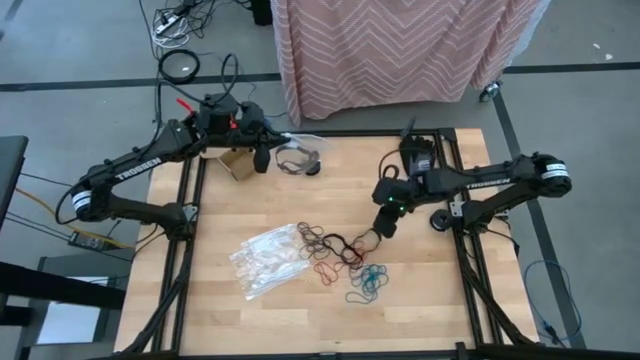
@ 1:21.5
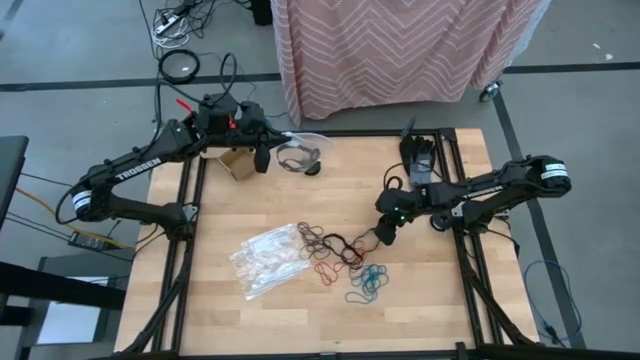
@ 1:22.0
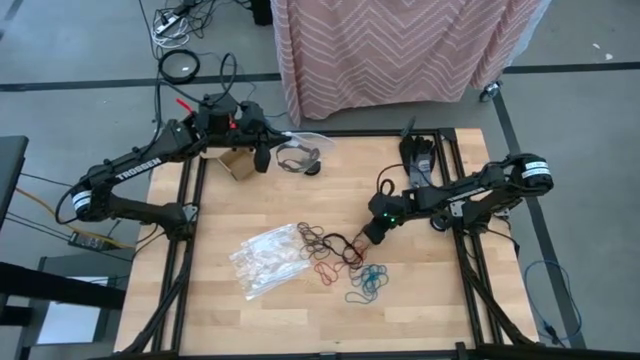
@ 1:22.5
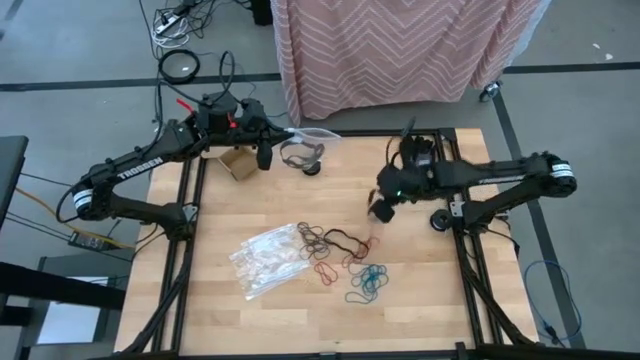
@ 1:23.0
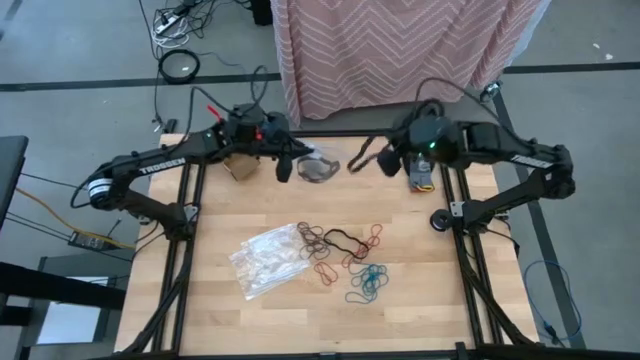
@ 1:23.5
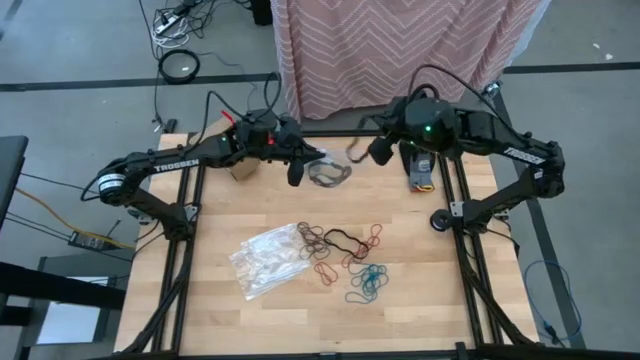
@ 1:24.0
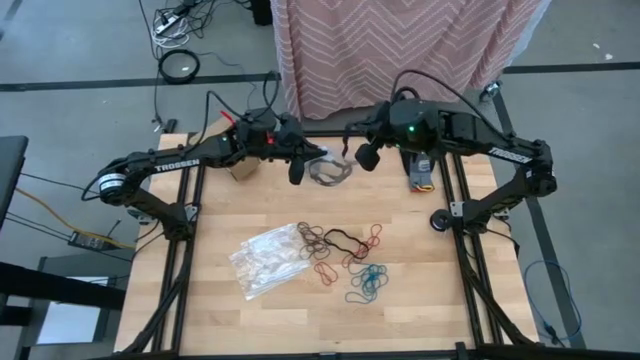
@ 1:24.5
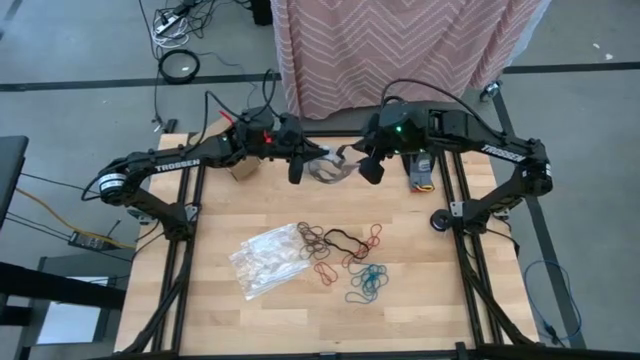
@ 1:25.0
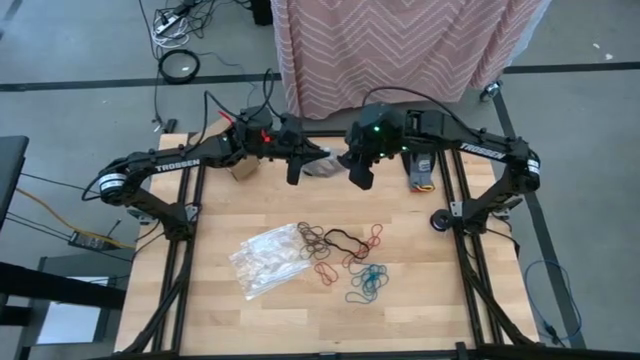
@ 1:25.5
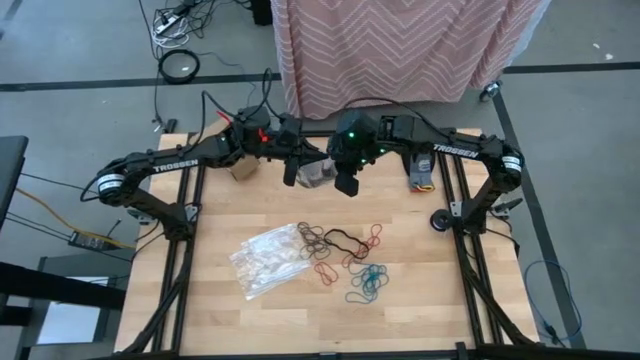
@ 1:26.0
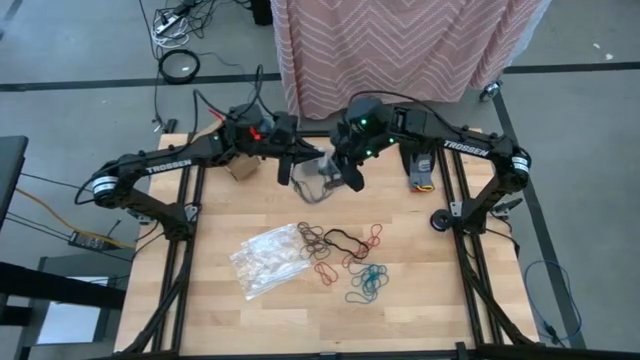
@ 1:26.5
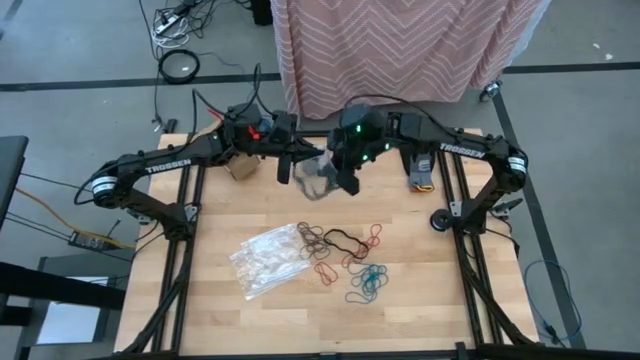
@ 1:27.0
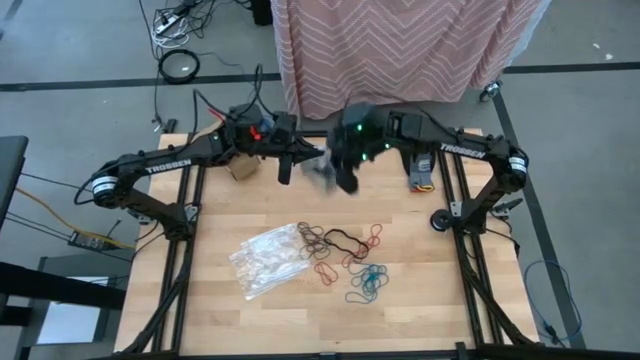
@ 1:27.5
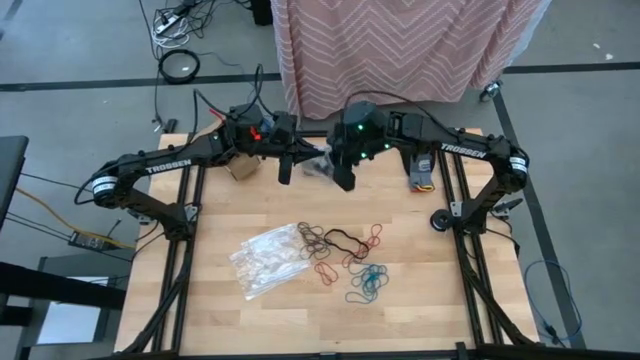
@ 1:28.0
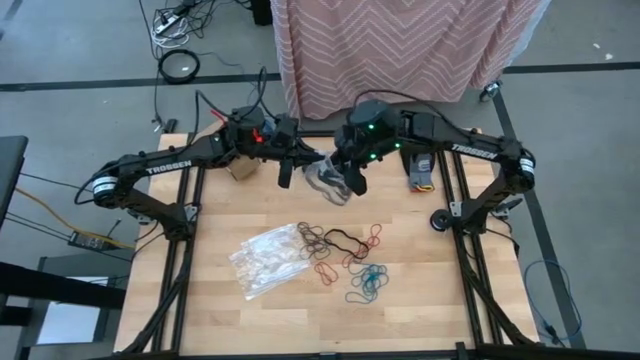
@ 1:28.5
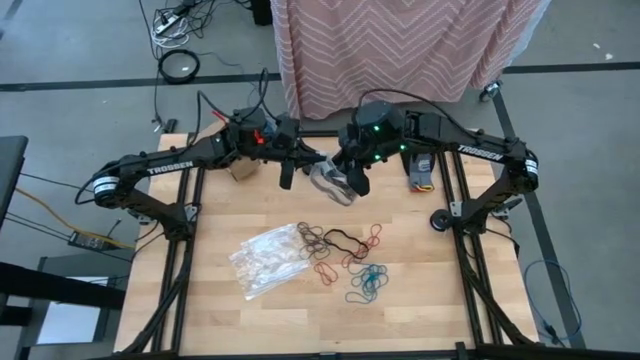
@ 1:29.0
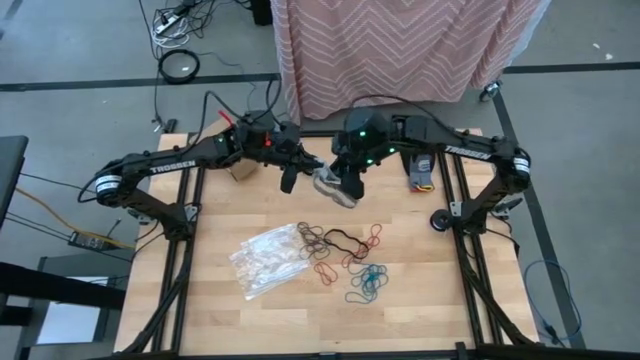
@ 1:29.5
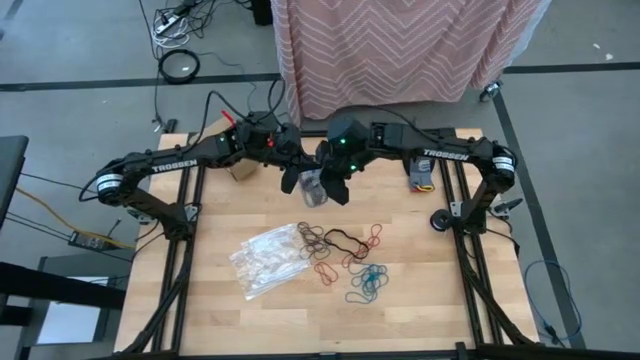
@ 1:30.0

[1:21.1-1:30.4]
Task: Sort rubber bands
Put the black rubber band into the transparent zip bag

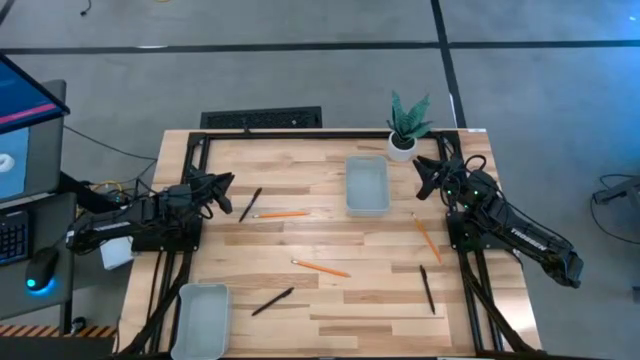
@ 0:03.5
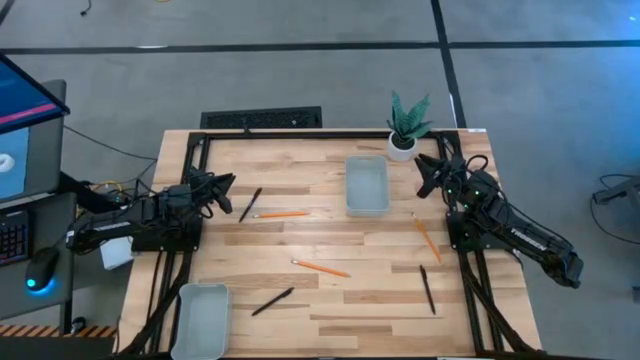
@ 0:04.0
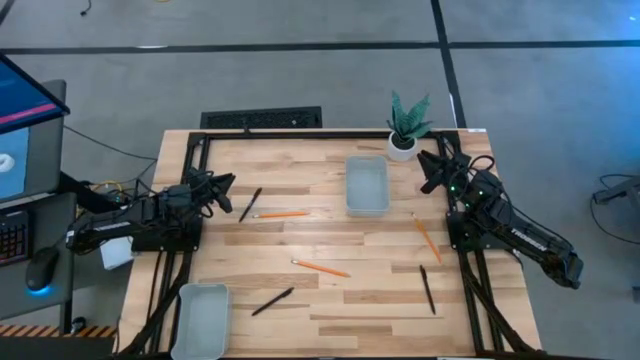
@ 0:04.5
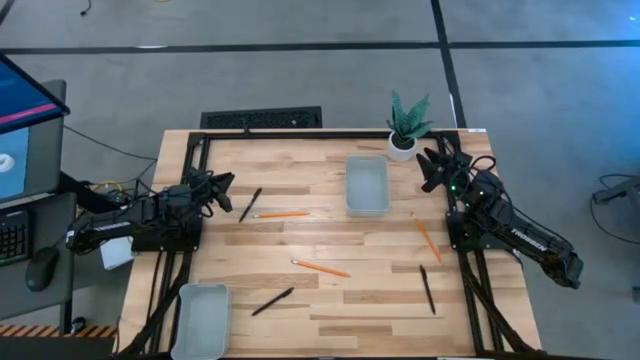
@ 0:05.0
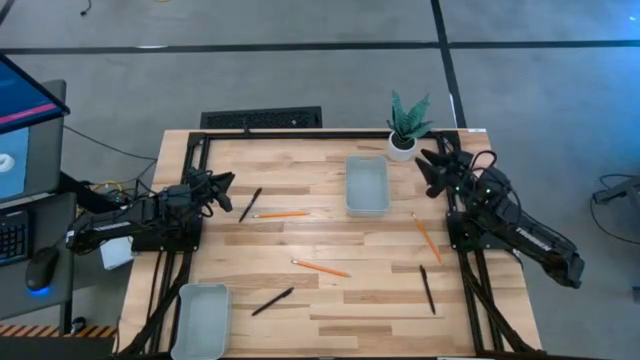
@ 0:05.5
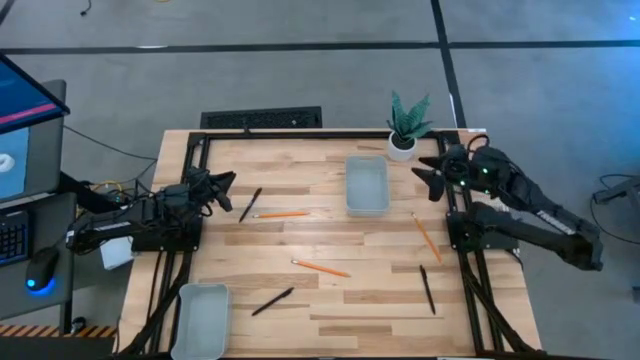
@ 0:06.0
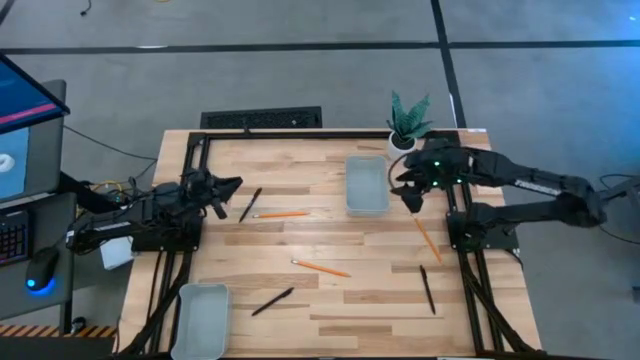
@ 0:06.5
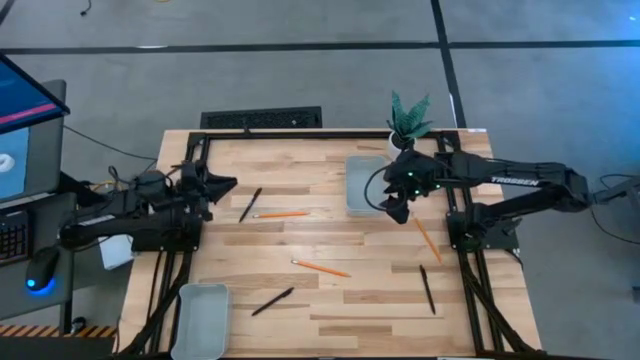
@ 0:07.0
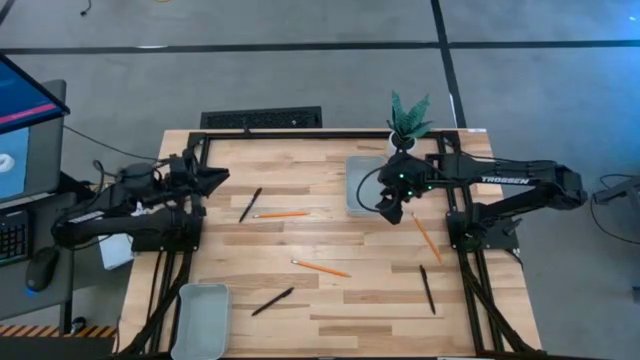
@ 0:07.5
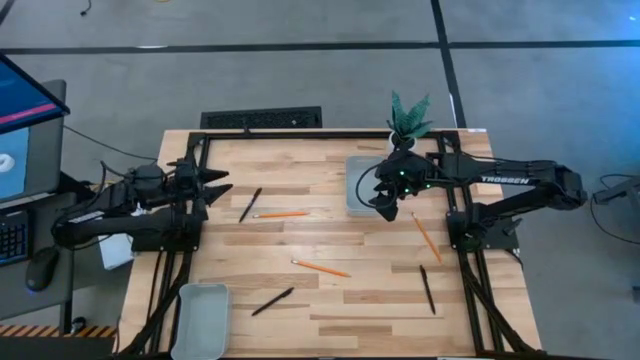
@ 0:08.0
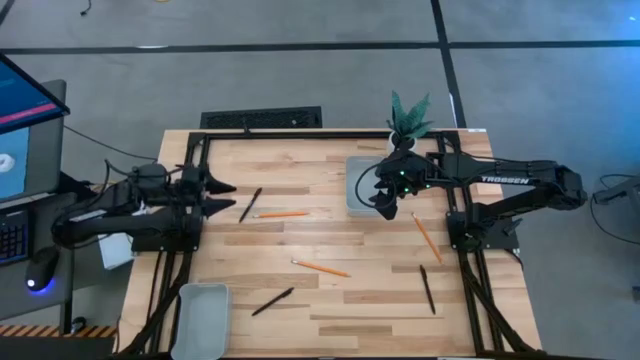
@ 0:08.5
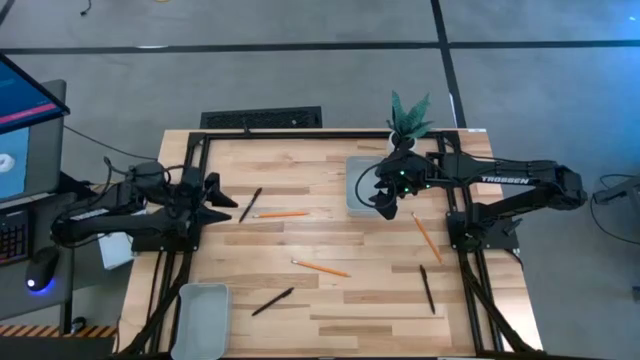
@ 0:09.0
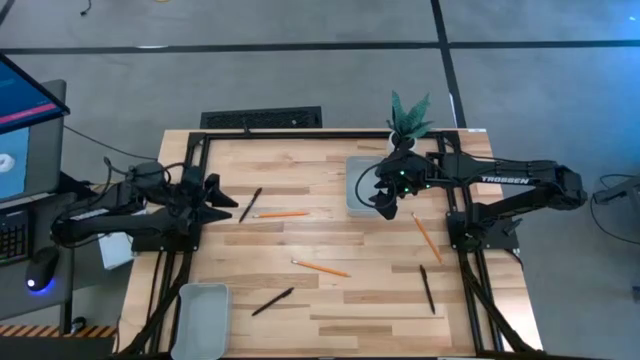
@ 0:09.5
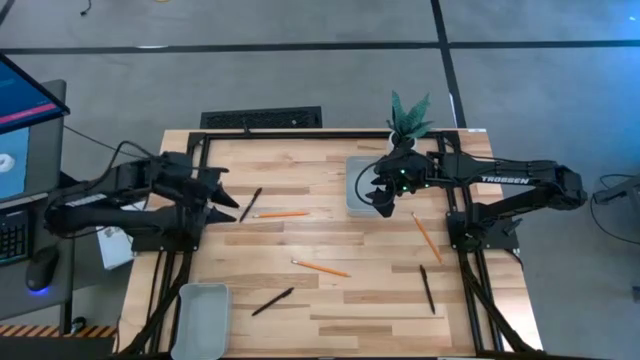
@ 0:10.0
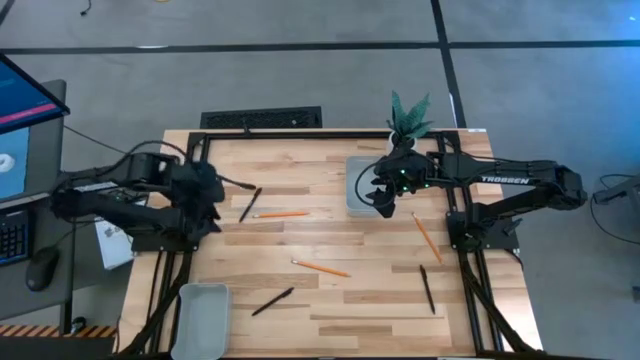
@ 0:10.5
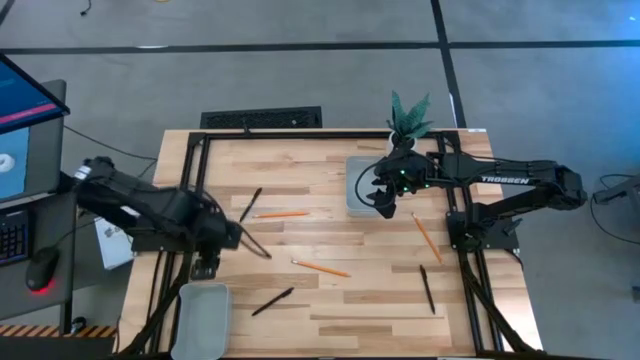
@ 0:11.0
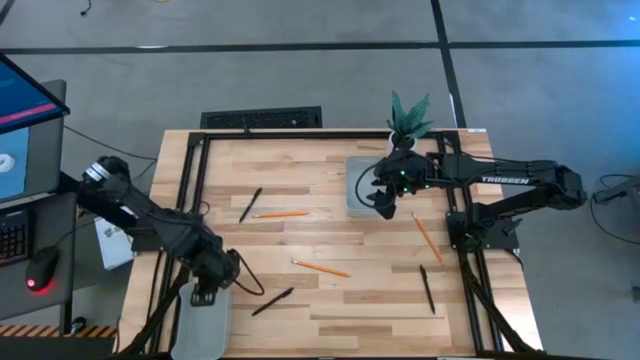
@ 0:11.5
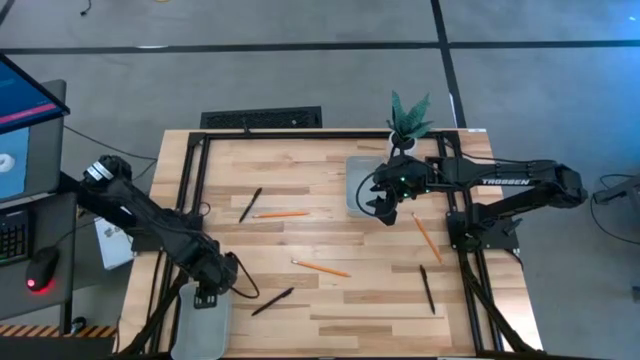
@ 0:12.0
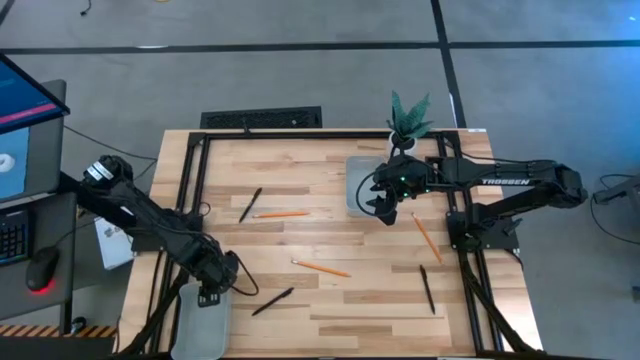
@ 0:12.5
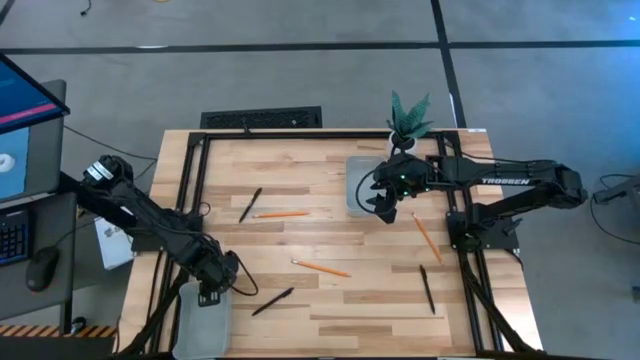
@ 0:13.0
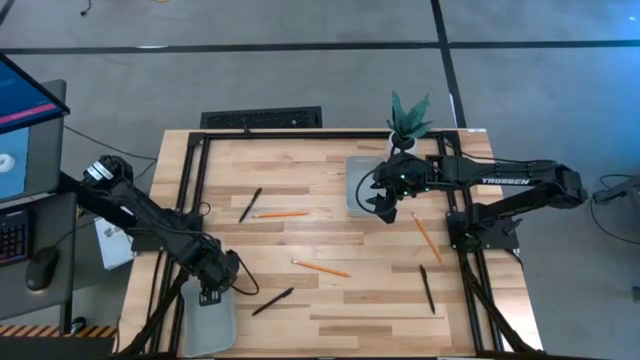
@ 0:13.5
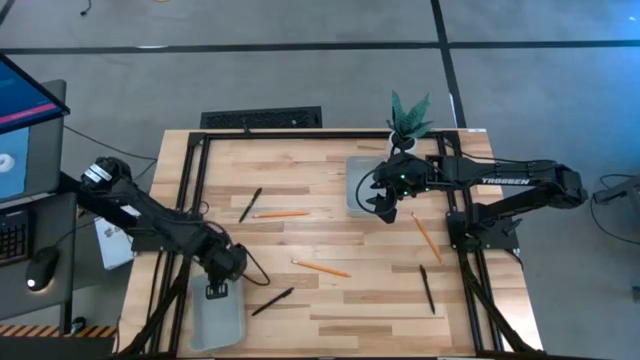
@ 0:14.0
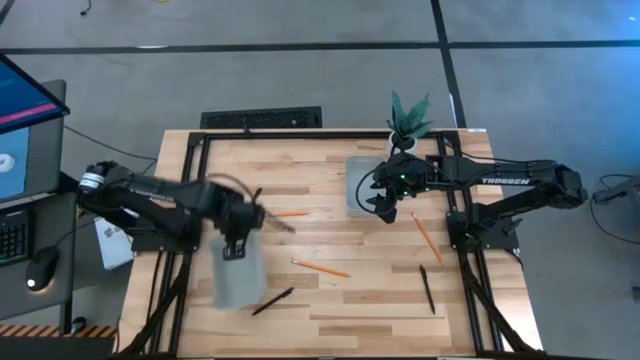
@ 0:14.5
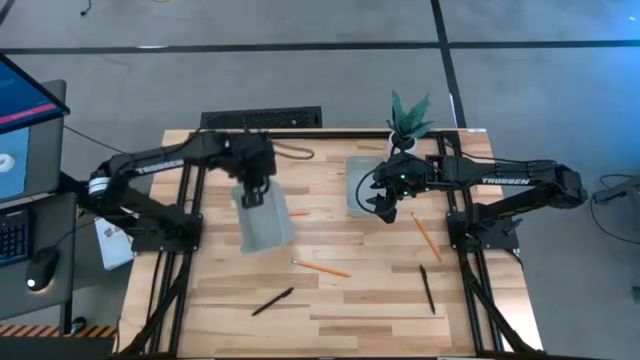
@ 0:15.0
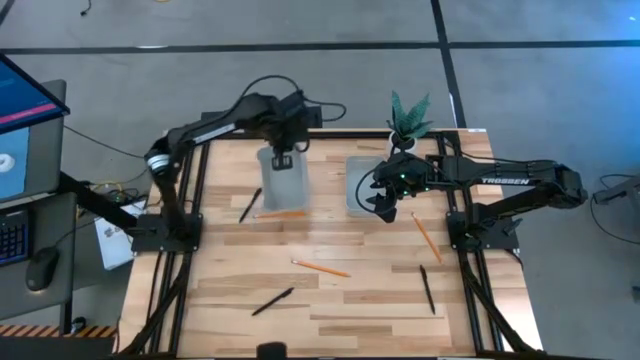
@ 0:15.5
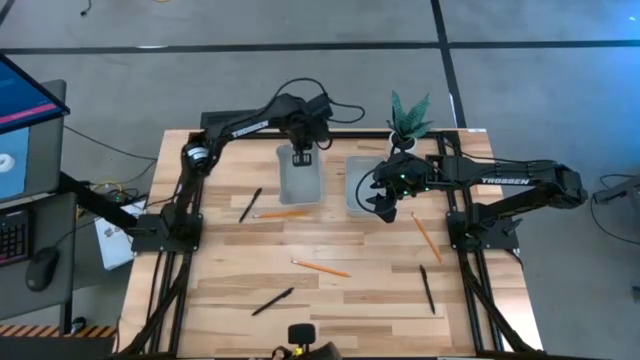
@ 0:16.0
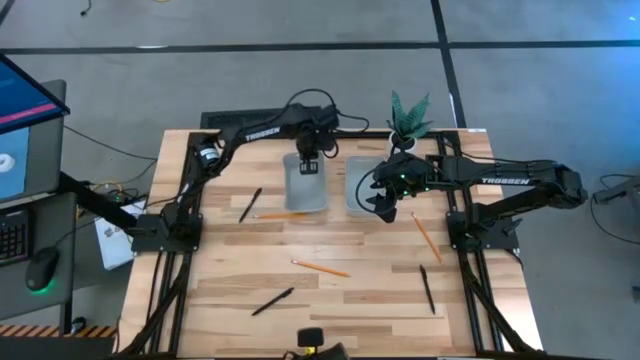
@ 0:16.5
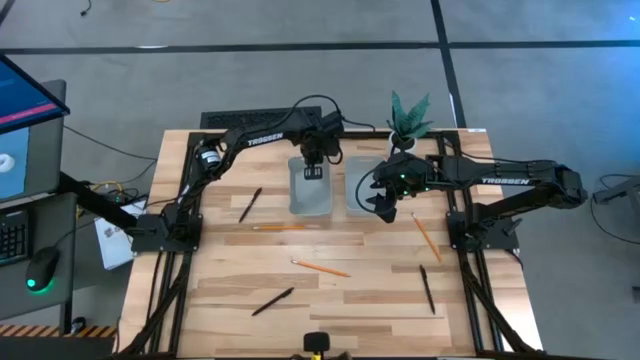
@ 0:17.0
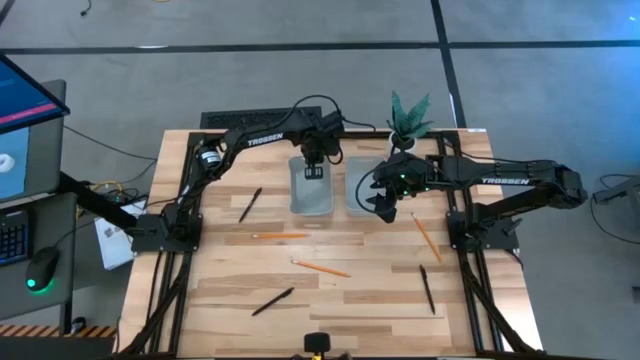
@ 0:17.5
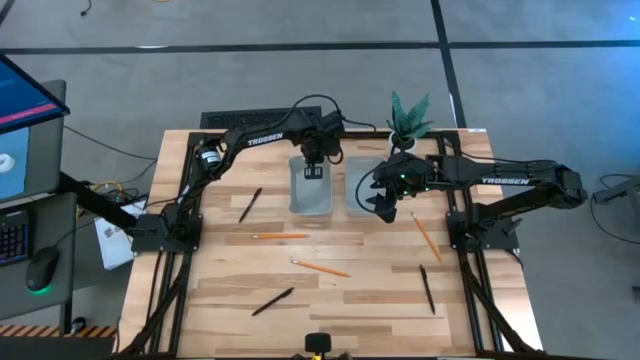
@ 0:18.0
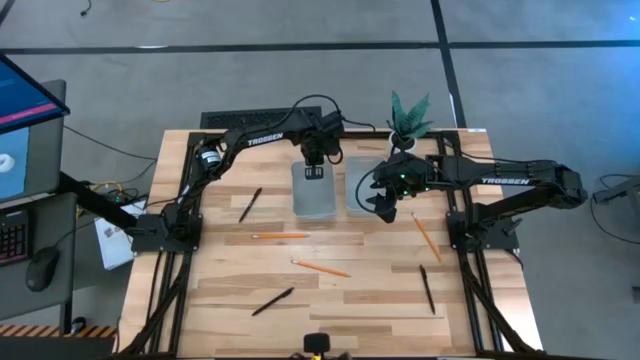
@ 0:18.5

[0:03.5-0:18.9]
Task: Sort pens & pencils
Move the bottom gray bin to the top of the table
